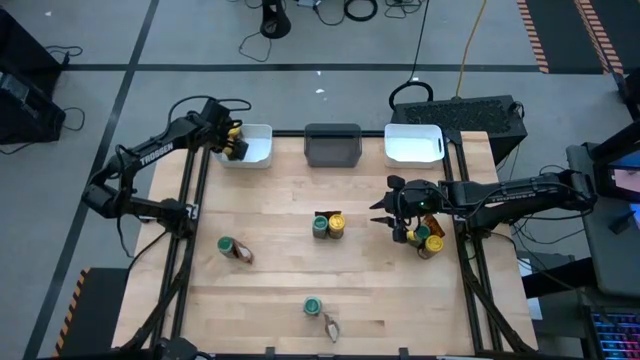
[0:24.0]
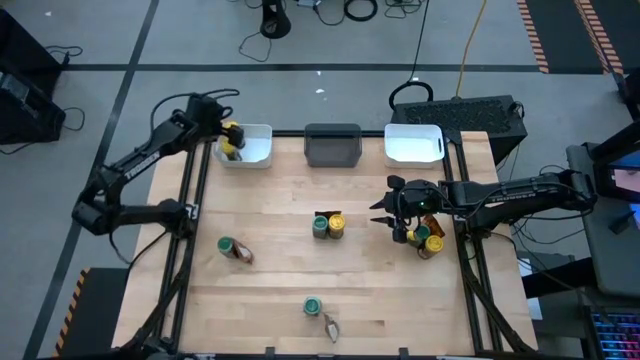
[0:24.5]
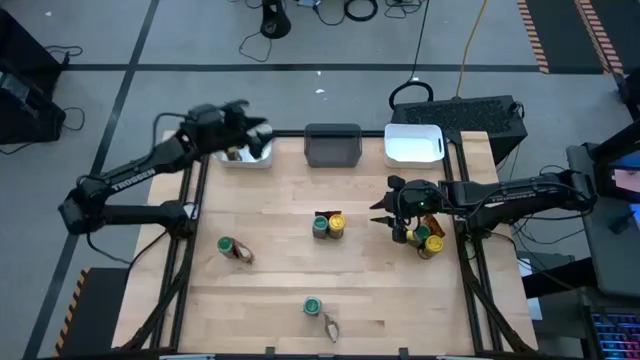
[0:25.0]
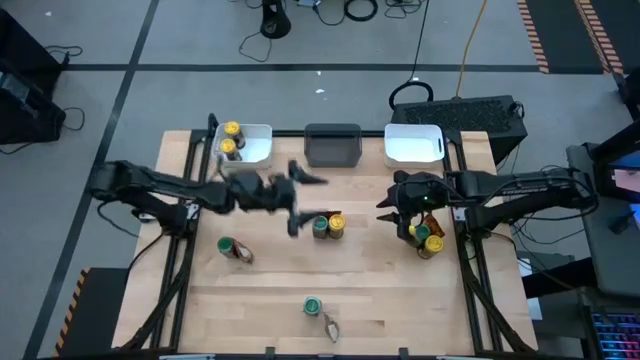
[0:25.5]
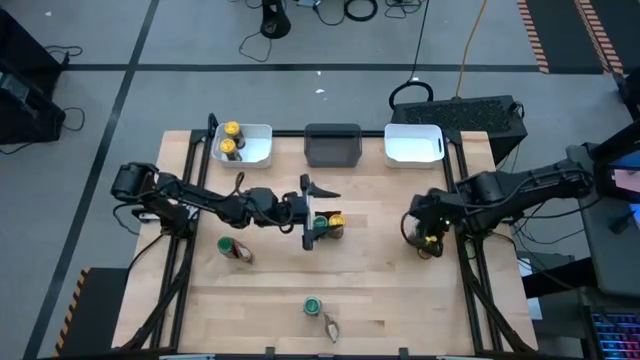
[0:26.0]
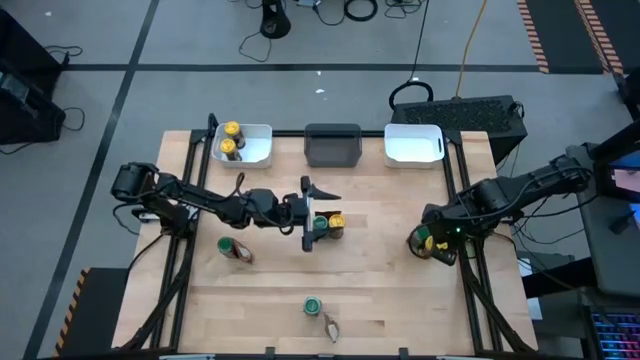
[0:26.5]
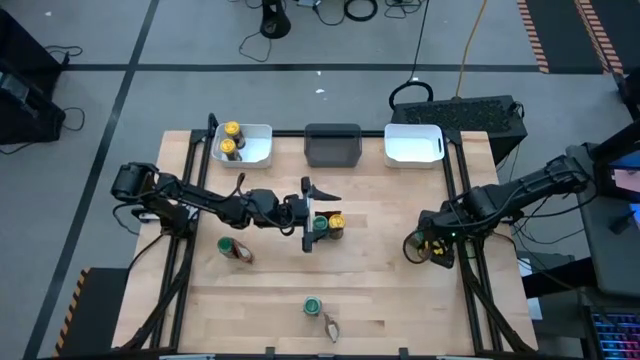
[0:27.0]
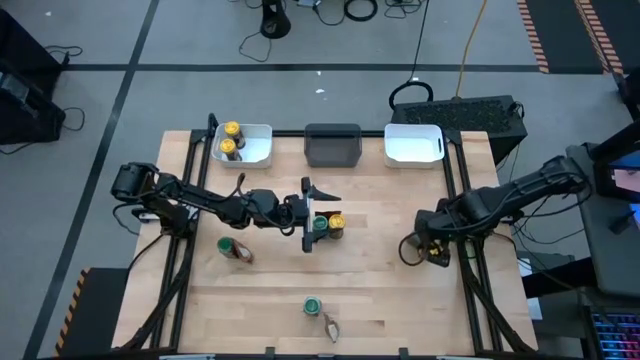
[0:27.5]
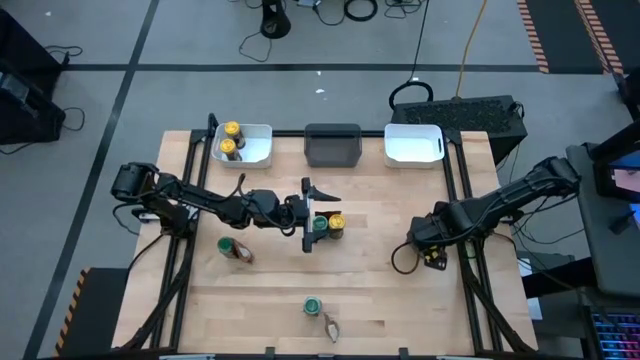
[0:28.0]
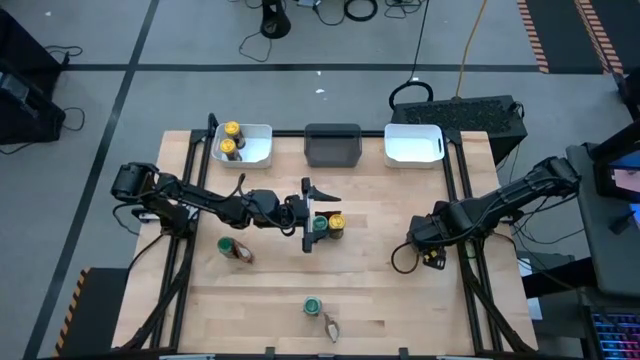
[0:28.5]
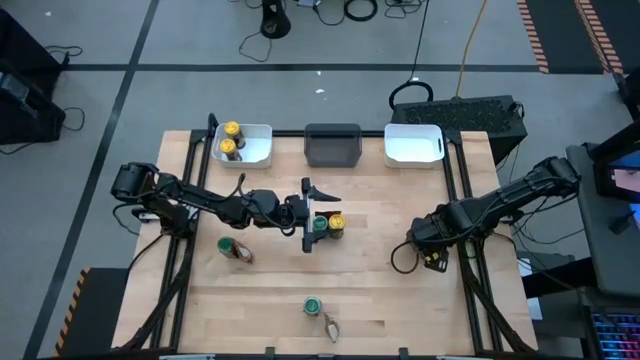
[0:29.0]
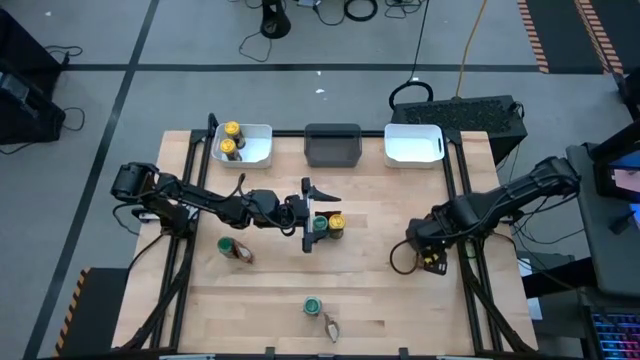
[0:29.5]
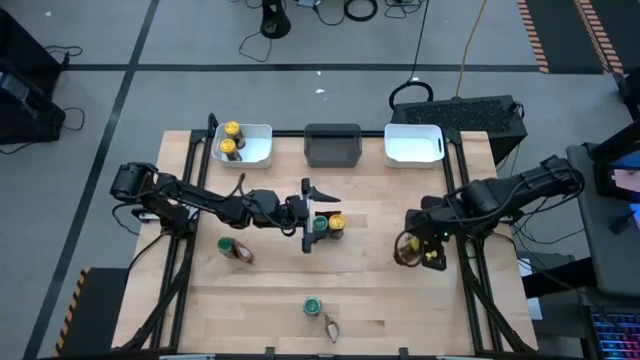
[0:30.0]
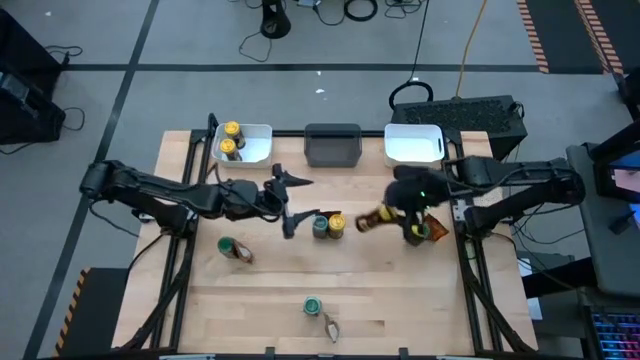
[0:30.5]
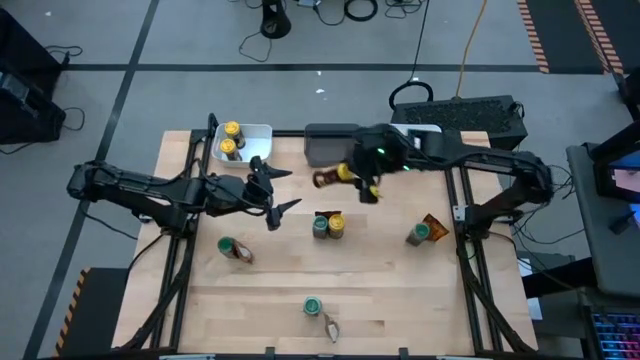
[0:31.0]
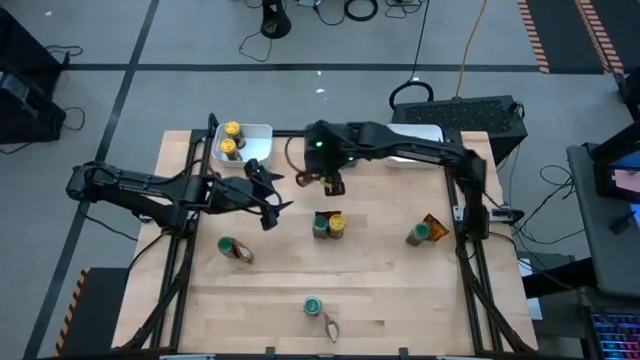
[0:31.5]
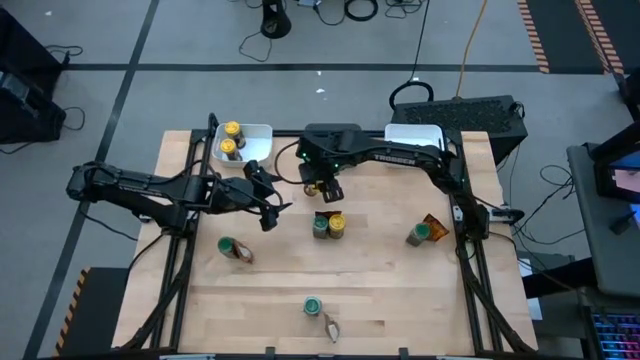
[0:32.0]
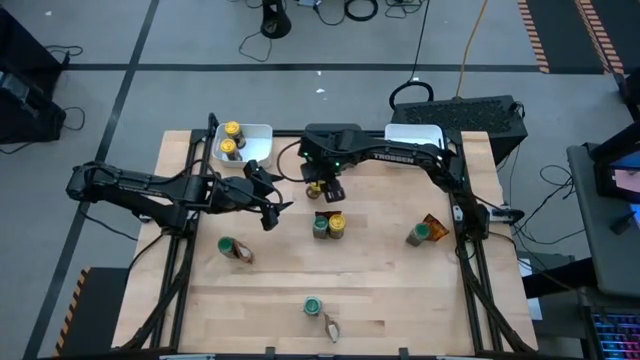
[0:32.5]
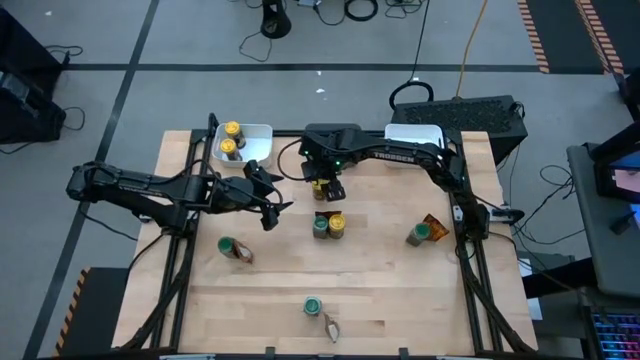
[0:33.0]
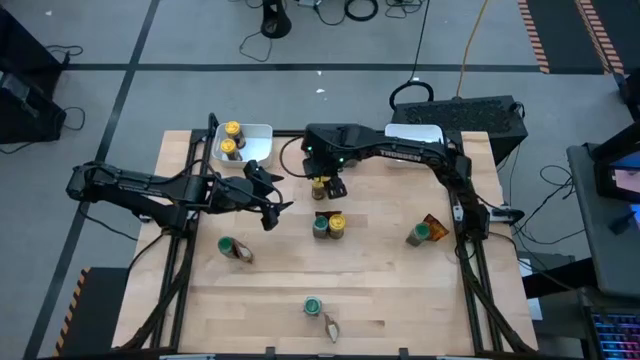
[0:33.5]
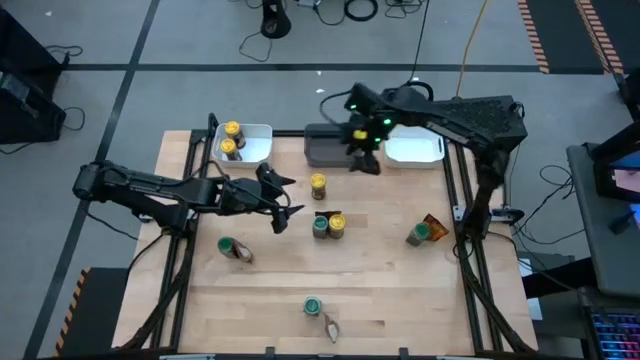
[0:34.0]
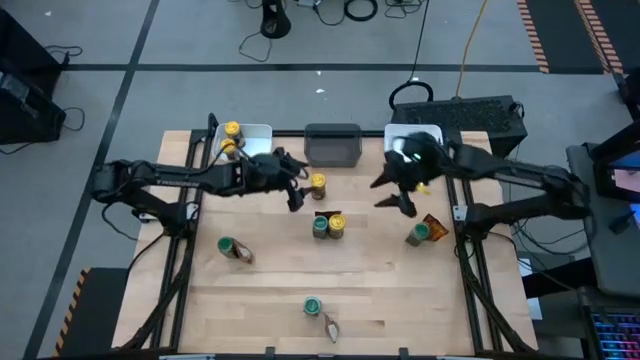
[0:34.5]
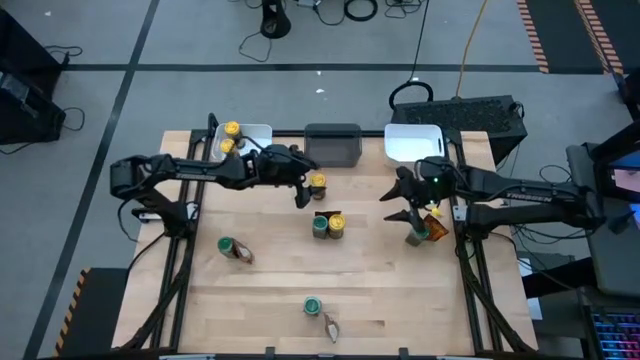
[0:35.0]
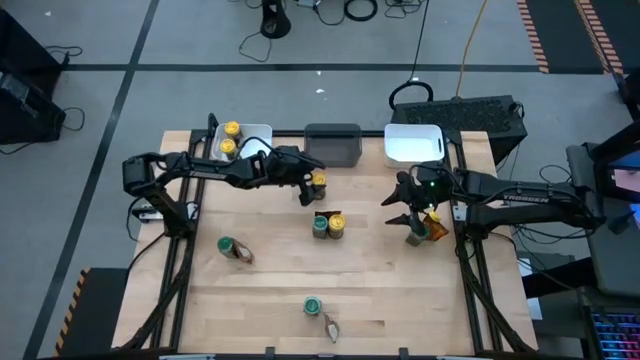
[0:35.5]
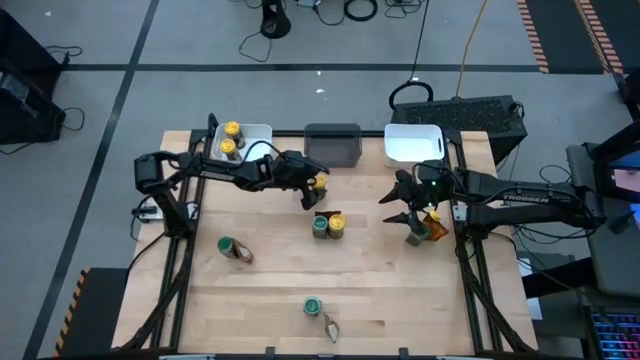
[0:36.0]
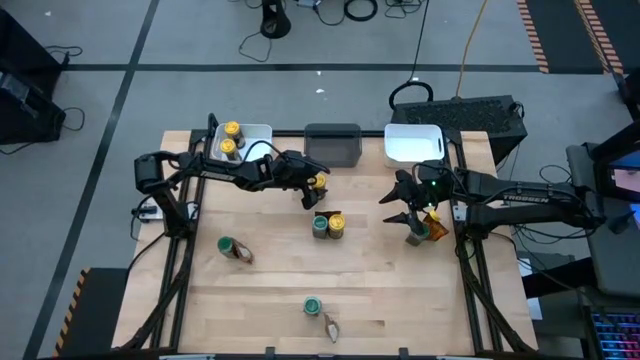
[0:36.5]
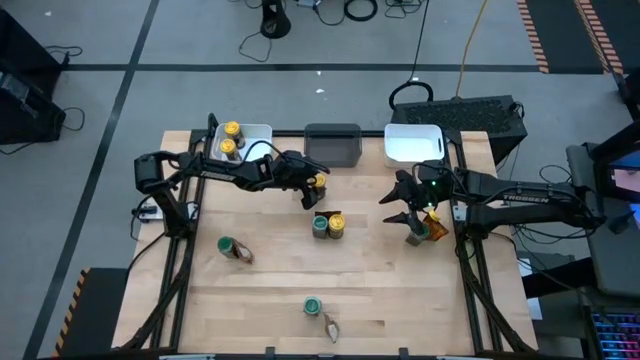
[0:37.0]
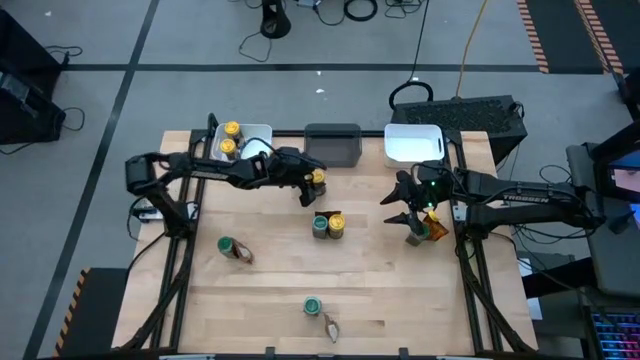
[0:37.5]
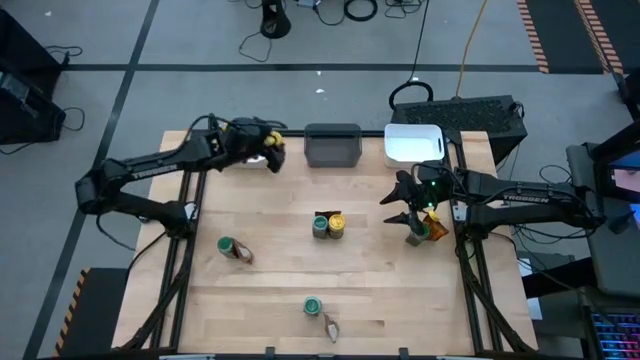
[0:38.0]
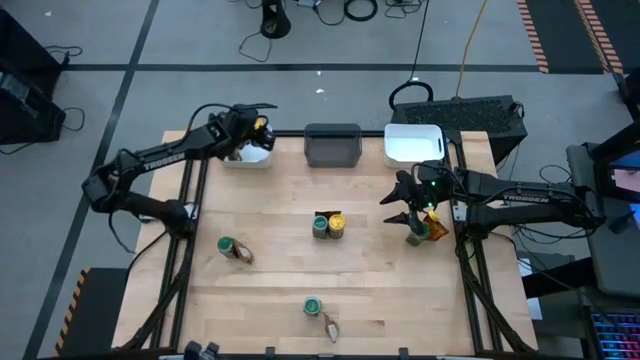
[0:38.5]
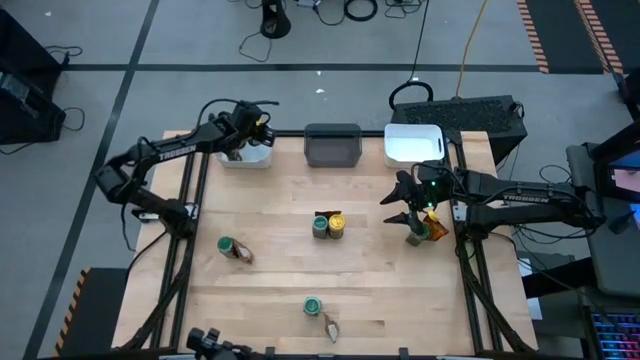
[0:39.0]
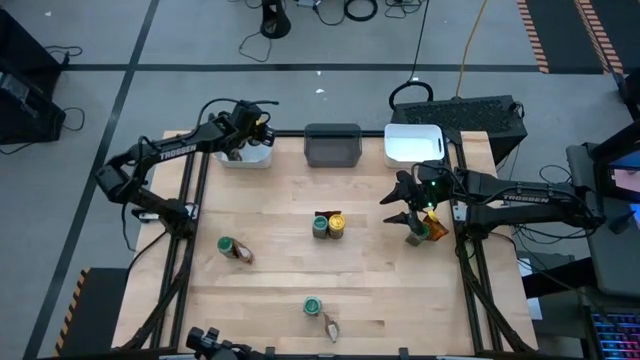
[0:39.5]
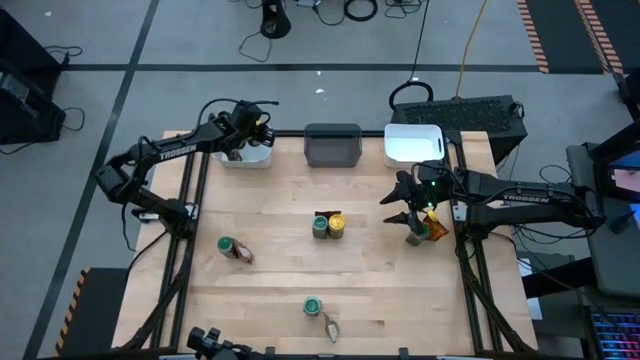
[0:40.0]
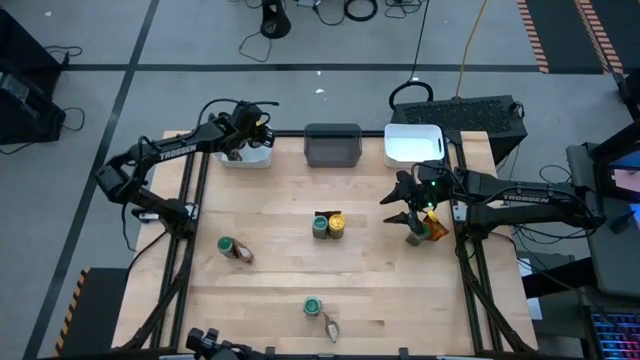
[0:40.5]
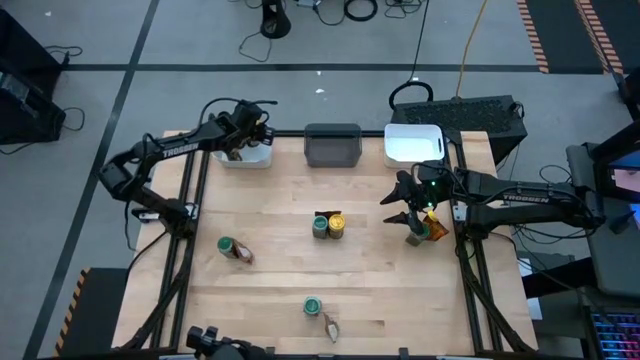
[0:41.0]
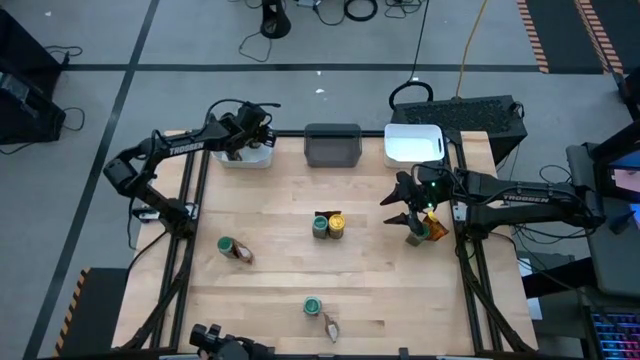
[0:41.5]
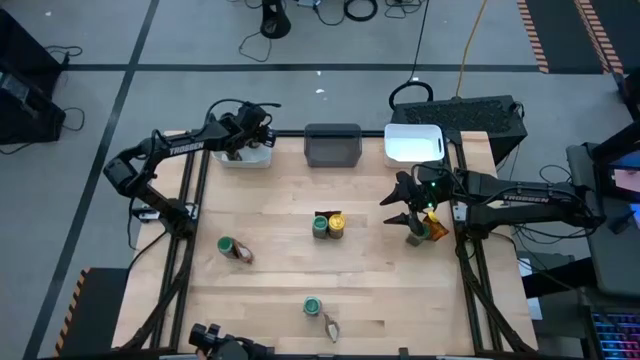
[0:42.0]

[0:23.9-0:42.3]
Task: Sort spices by type
Put the right yellow seasoning bottle into the left white bin

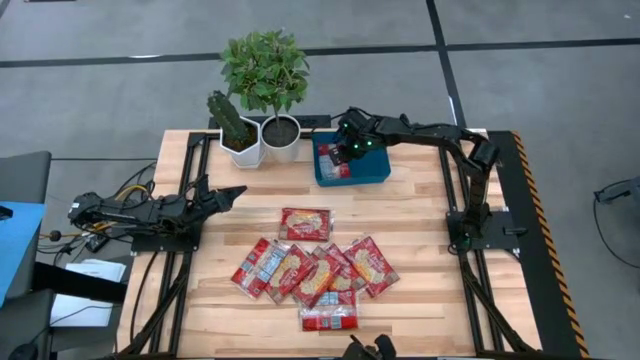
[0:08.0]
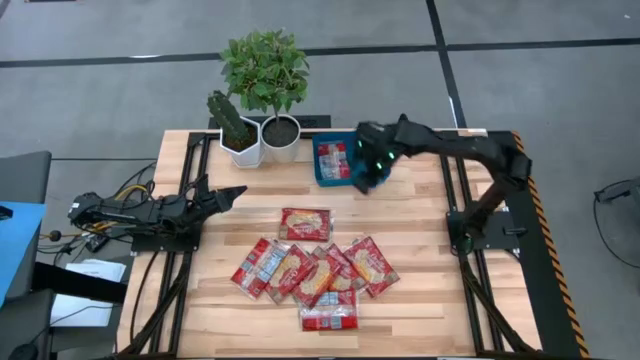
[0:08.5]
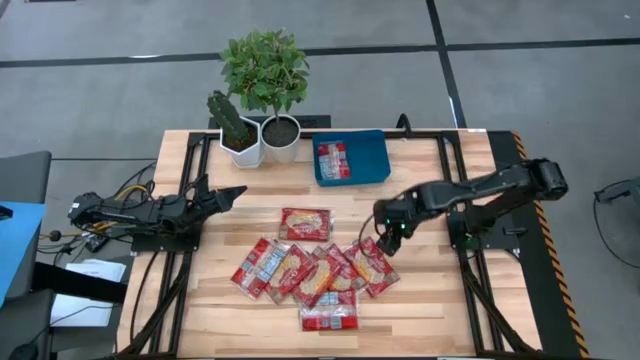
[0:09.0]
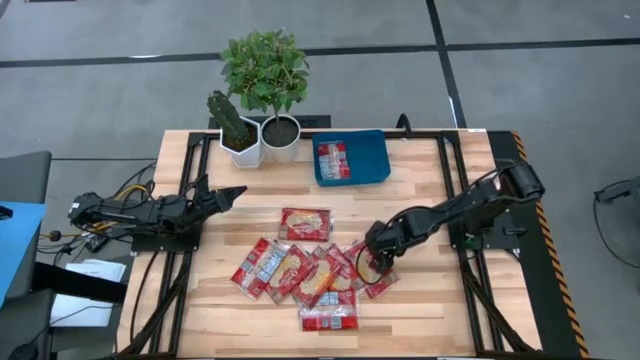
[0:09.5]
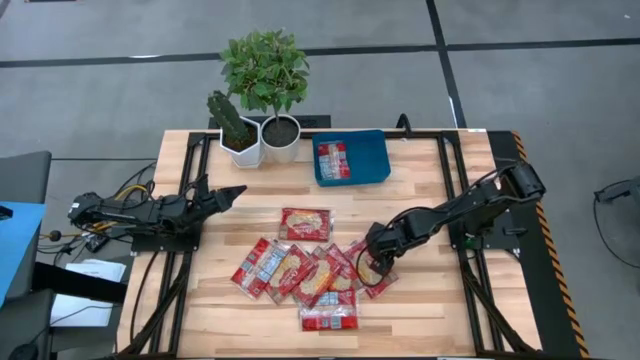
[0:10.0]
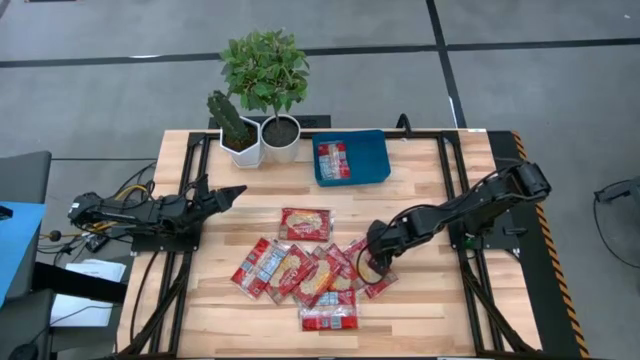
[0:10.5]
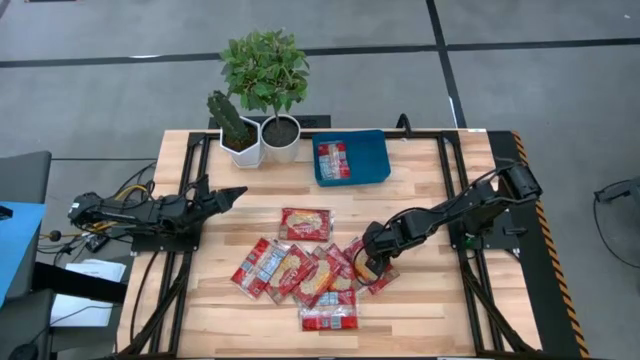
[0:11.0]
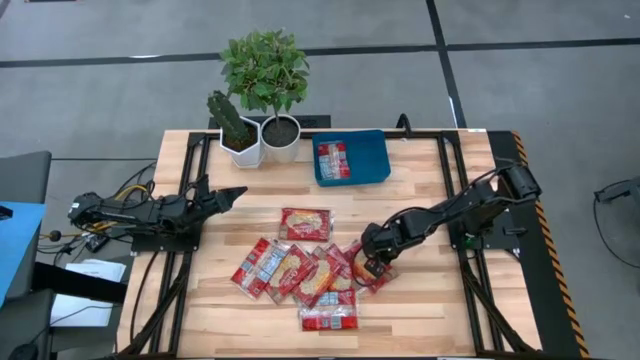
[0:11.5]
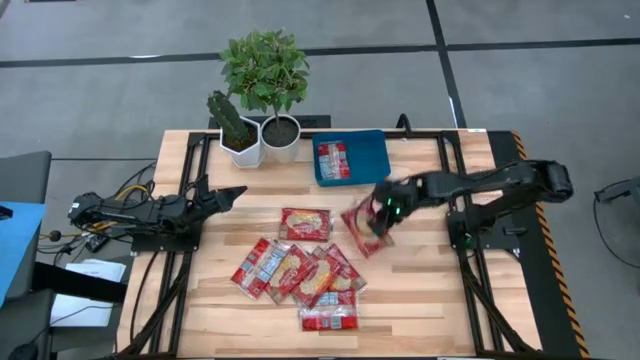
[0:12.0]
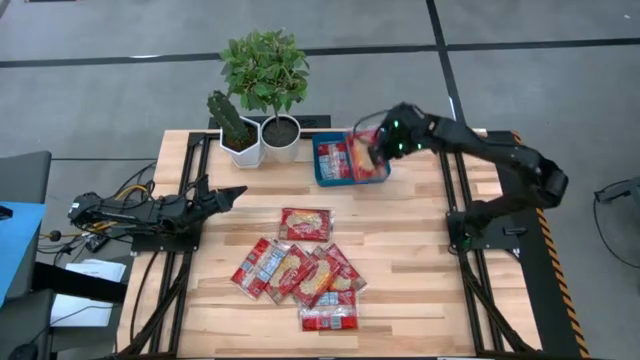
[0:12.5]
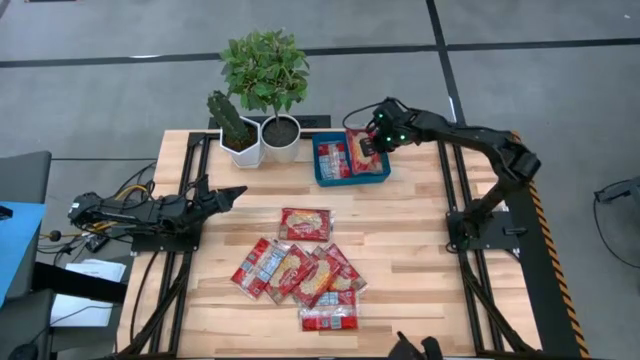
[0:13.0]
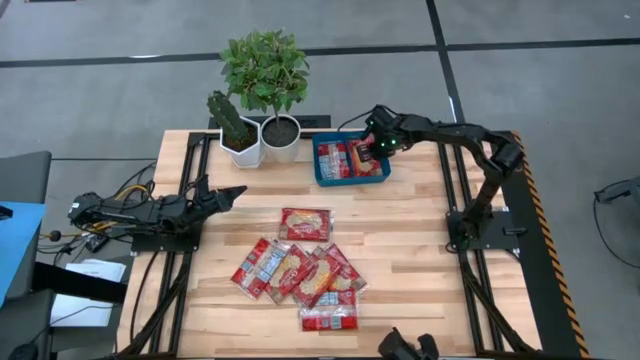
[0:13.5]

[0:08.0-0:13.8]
Task: Sort popcorn bags into baskets
Put the red popcorn bag into the blue container
